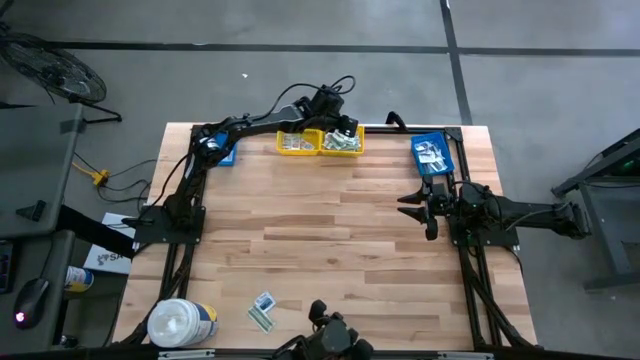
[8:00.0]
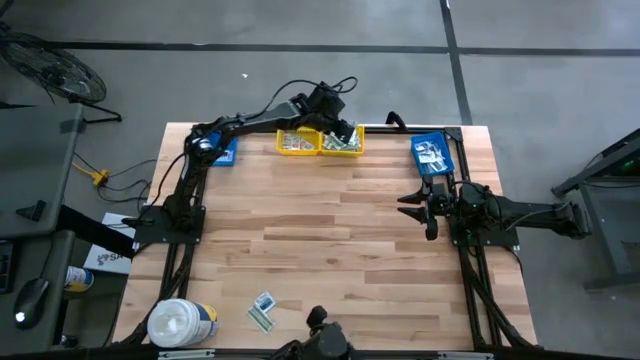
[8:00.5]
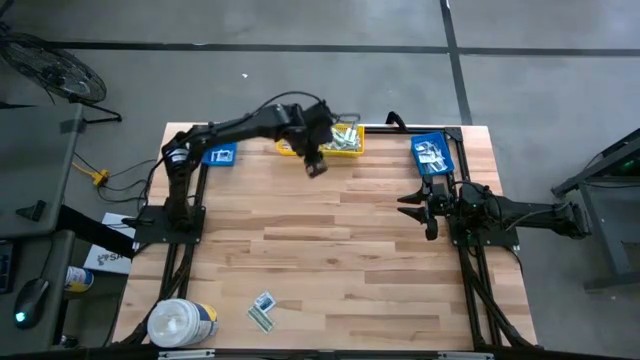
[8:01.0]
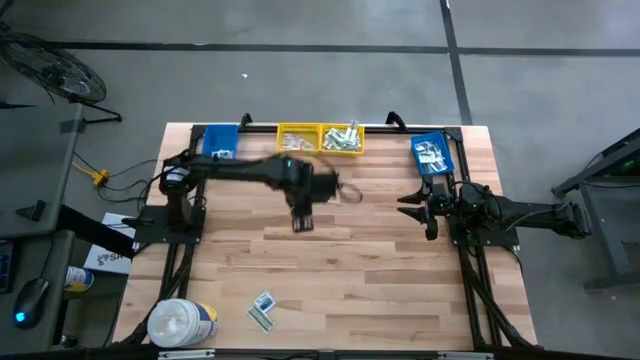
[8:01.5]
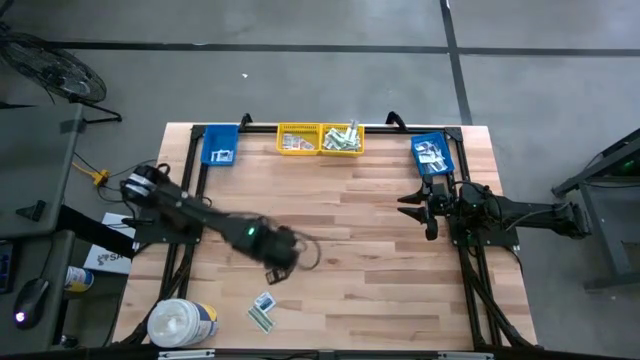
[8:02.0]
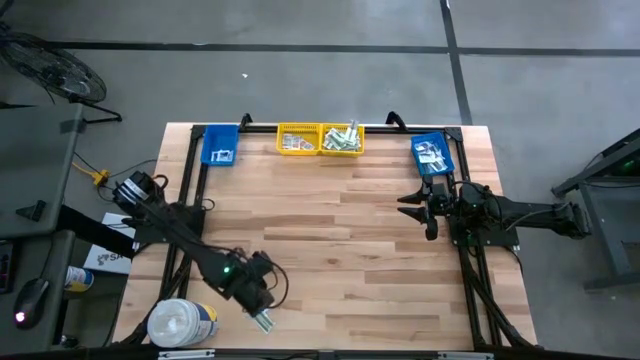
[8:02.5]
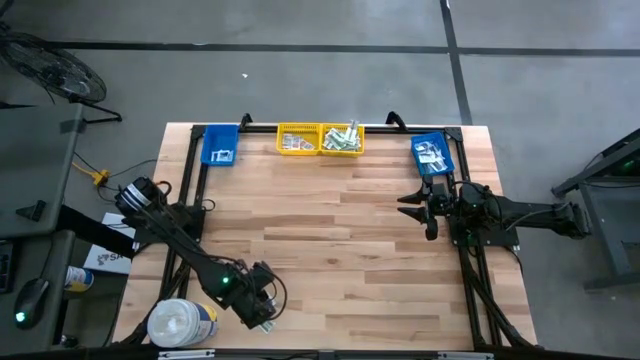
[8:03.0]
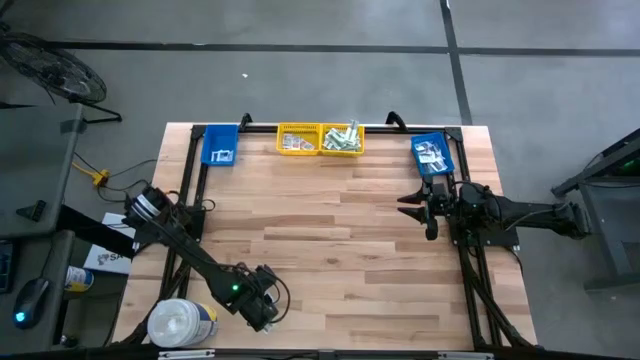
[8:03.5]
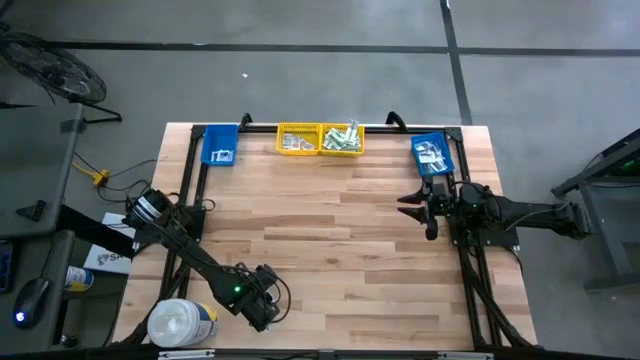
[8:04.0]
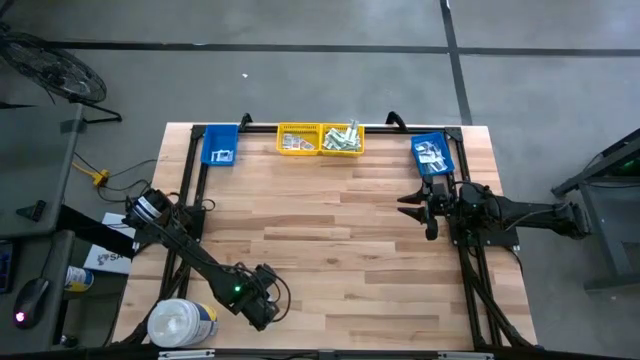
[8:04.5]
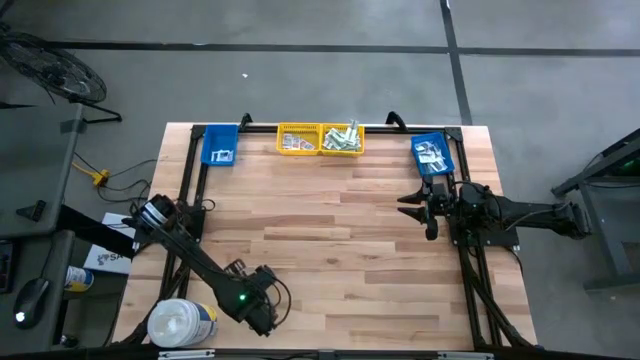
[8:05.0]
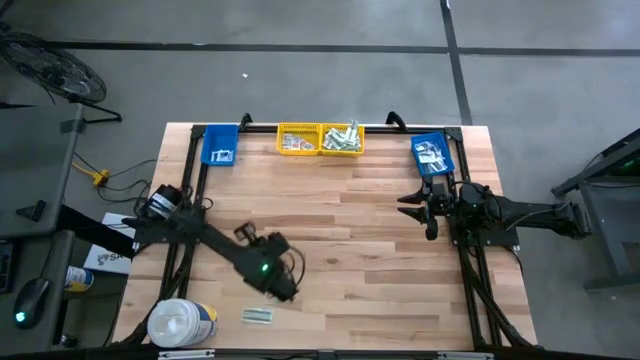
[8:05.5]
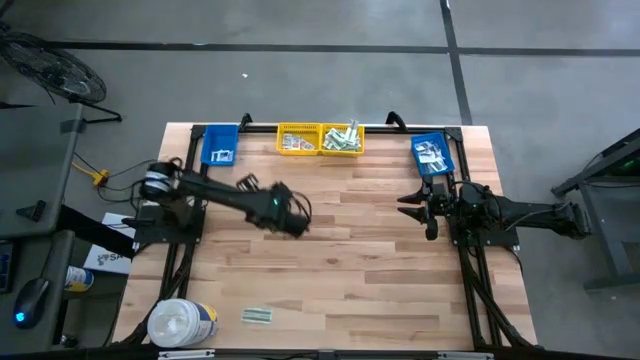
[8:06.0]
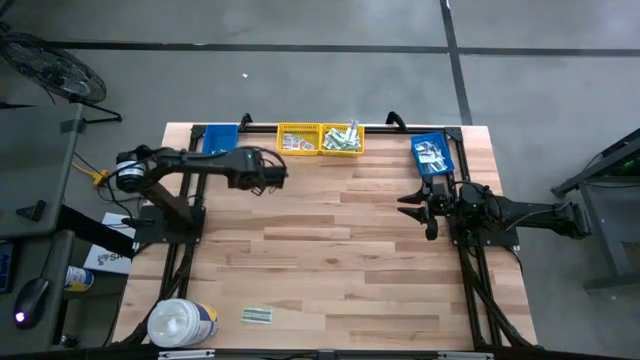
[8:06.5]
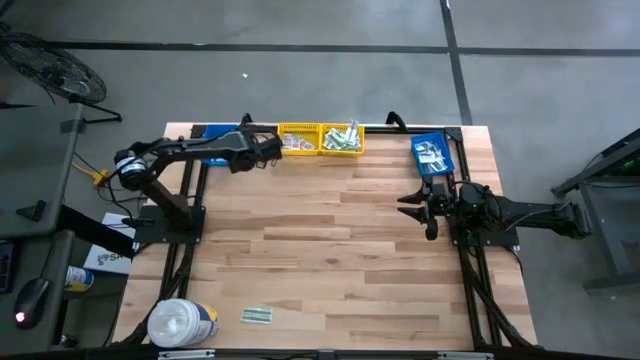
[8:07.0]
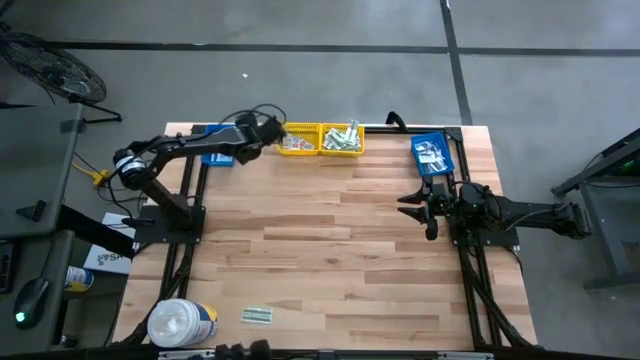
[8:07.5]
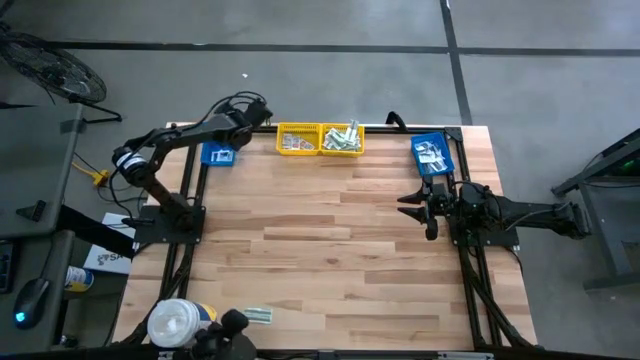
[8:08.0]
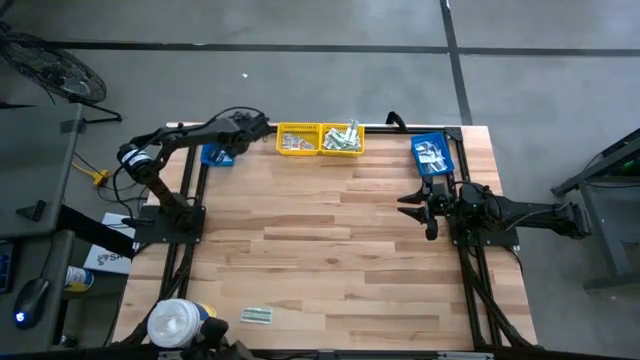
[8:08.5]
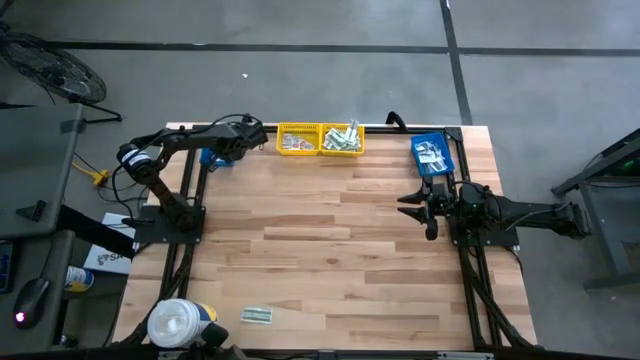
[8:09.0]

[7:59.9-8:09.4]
Task: Pick & Place First Aid Supplies
Put the blue alcohol pad into the left blue bin

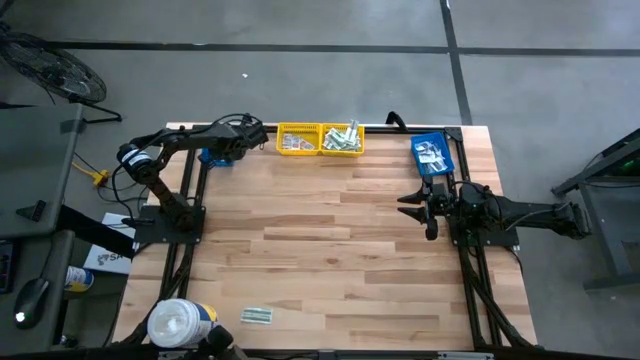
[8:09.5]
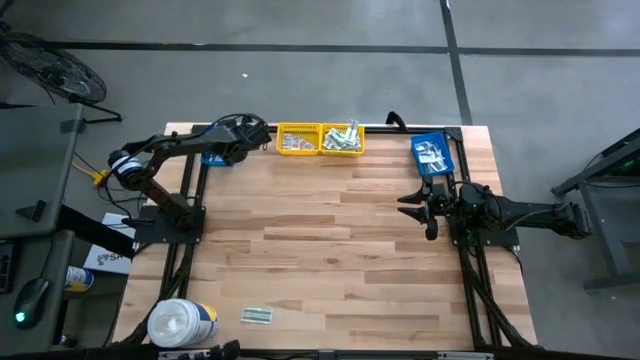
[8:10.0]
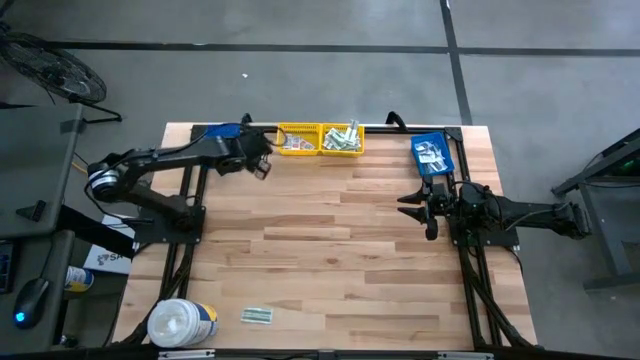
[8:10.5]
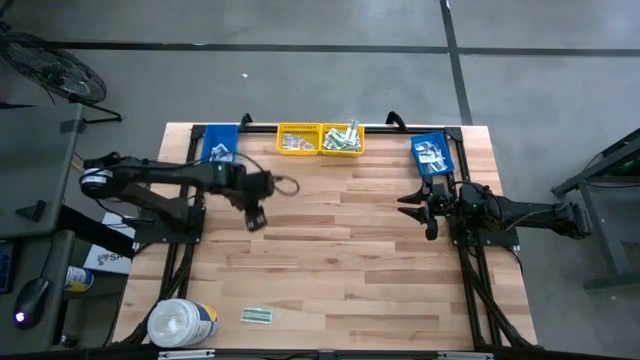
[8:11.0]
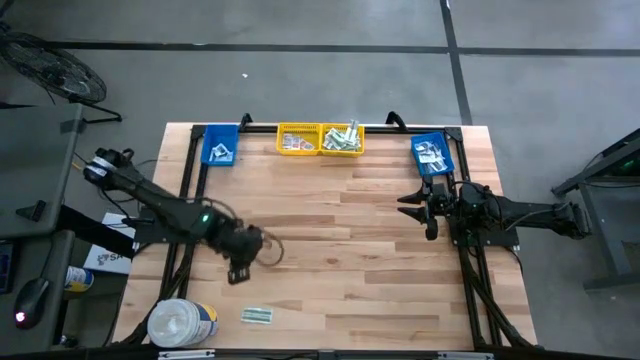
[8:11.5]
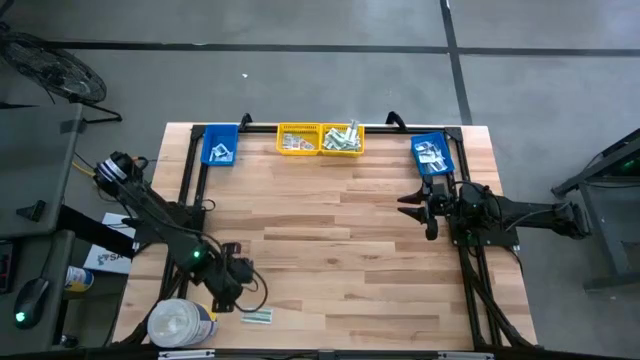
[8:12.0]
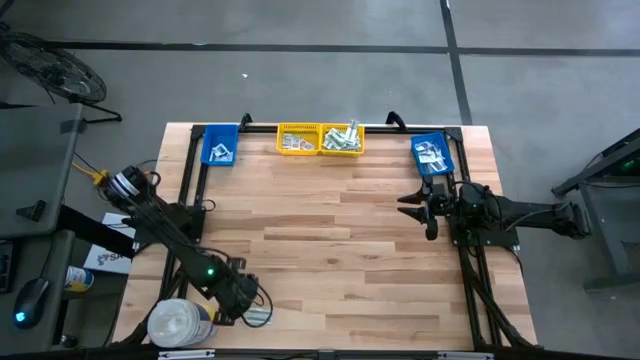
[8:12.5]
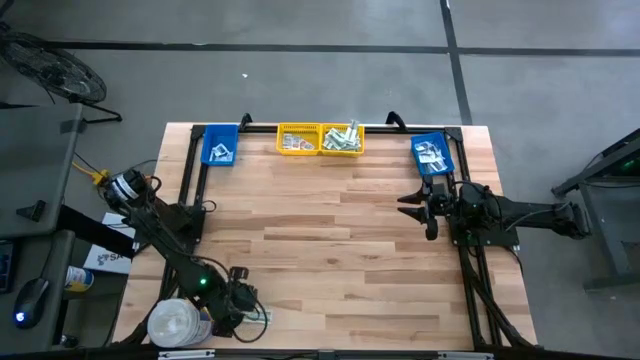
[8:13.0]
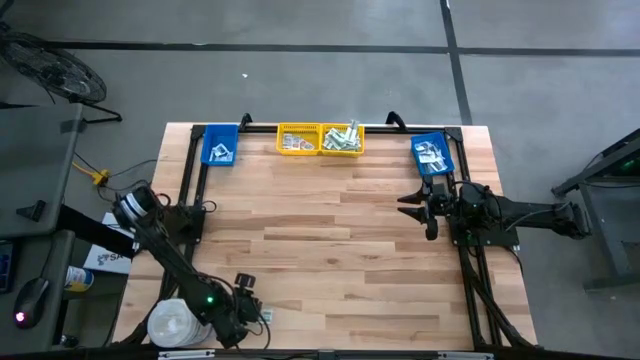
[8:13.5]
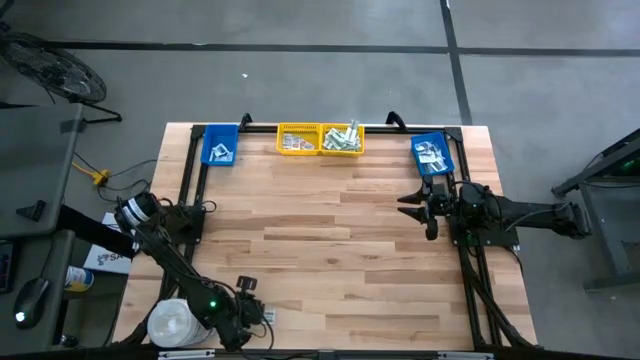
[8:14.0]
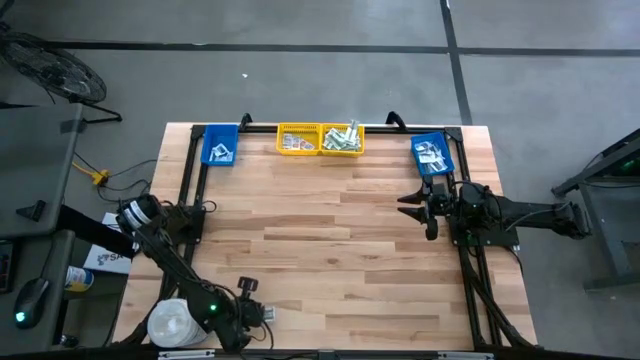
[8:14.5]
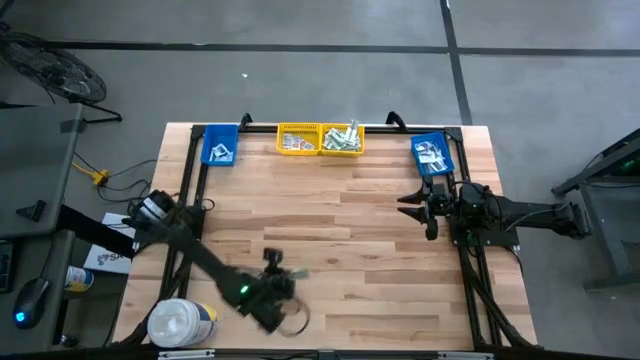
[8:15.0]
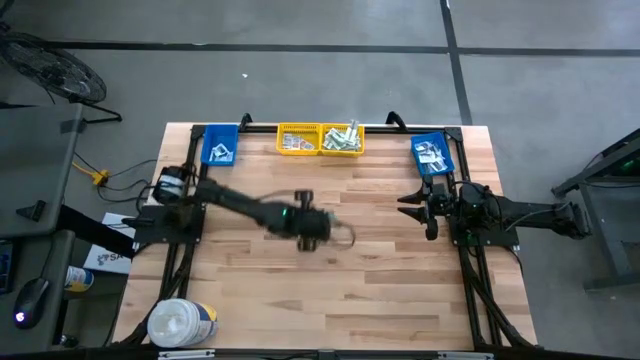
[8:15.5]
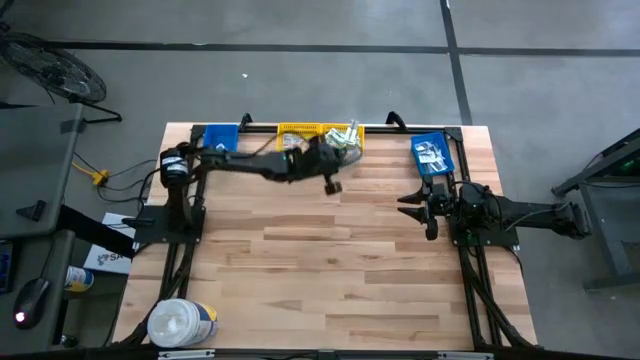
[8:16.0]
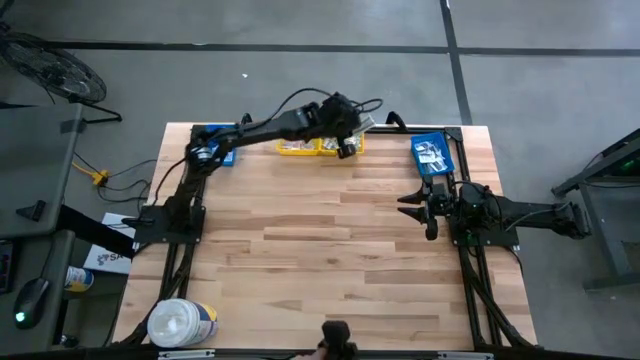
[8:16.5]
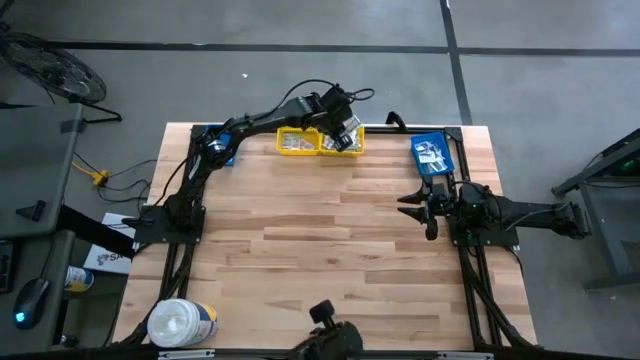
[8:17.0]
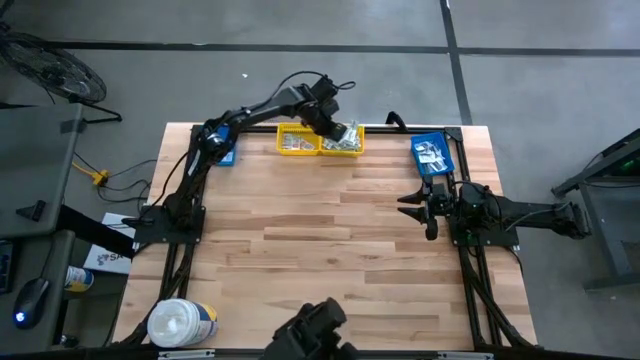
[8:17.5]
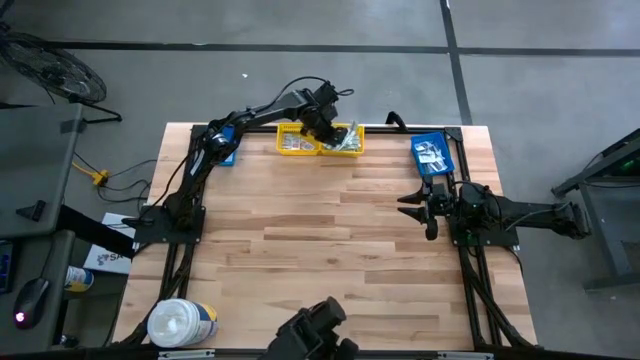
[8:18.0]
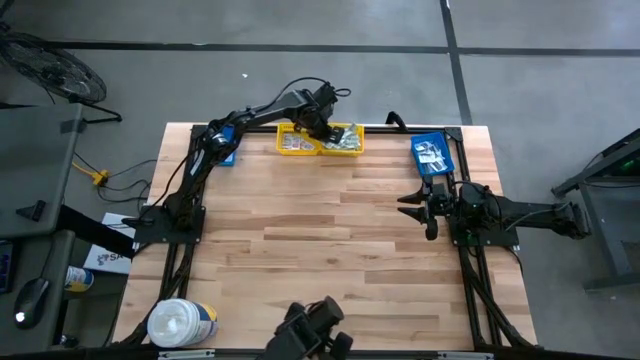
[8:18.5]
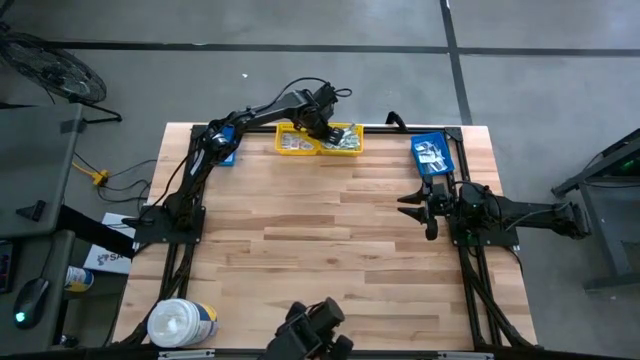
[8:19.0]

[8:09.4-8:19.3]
Put the green bandage pack into the right yellow bin
